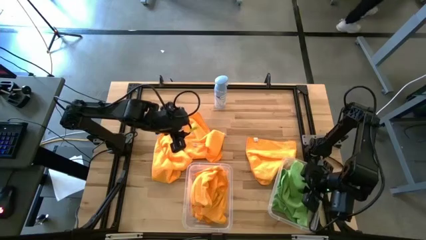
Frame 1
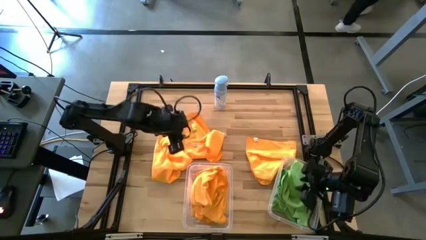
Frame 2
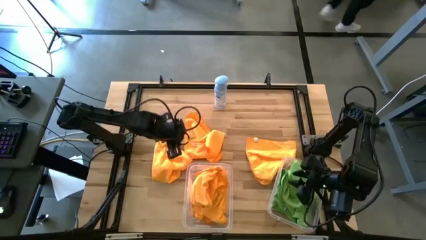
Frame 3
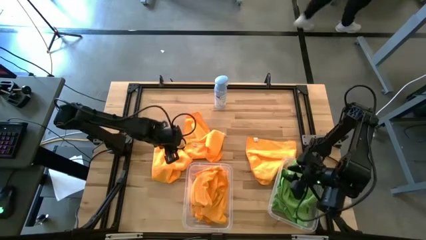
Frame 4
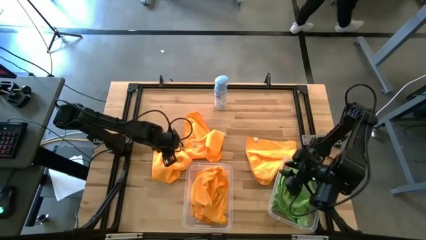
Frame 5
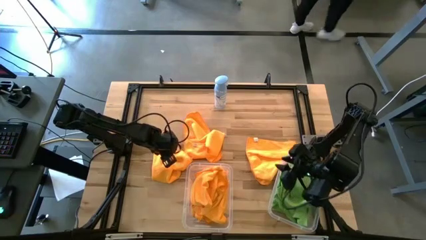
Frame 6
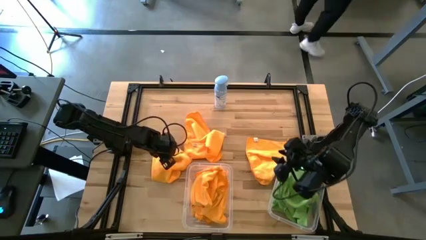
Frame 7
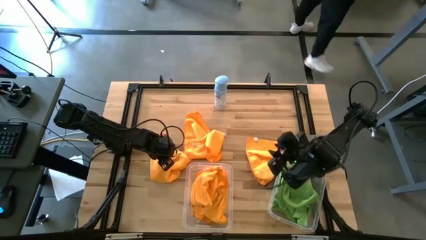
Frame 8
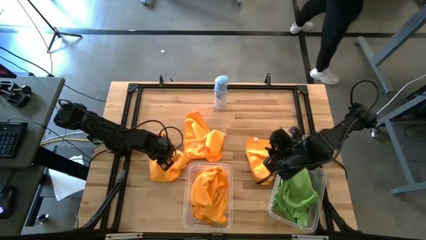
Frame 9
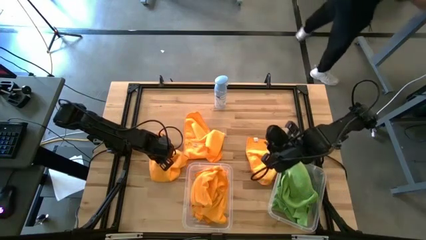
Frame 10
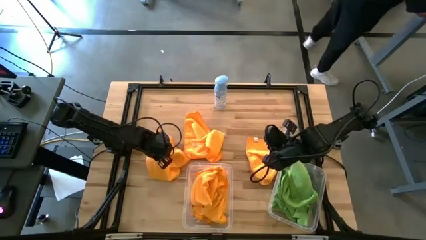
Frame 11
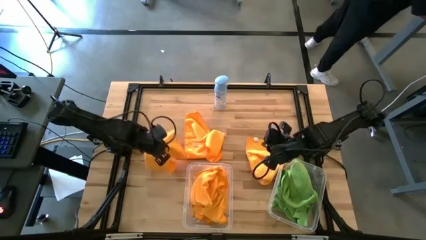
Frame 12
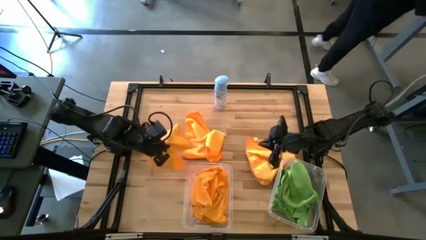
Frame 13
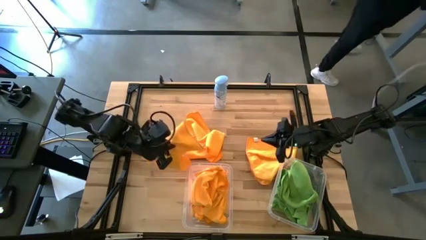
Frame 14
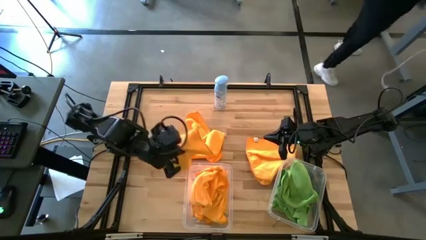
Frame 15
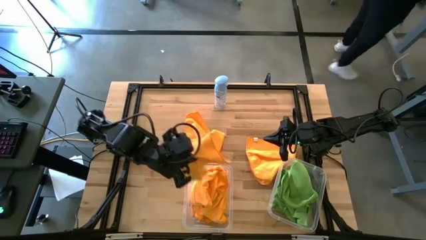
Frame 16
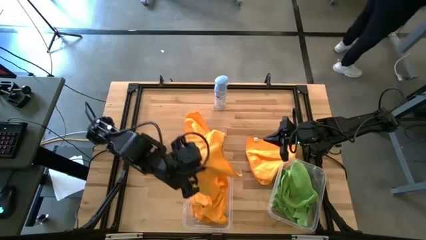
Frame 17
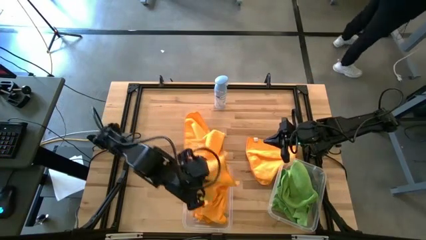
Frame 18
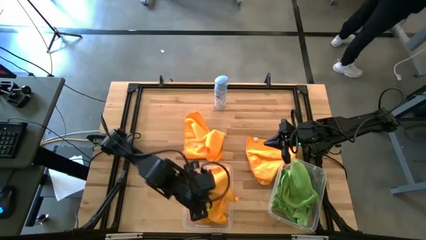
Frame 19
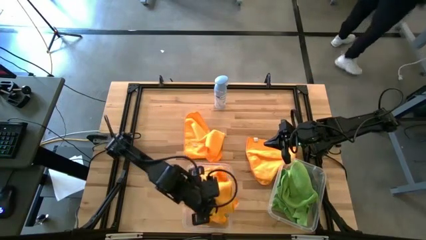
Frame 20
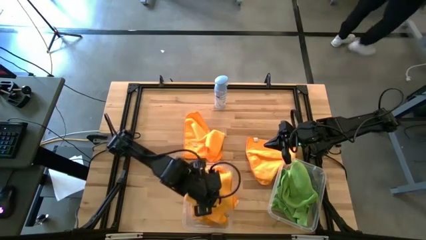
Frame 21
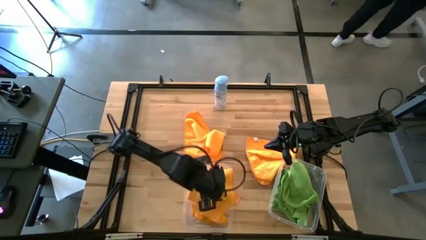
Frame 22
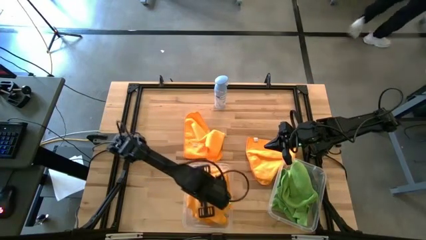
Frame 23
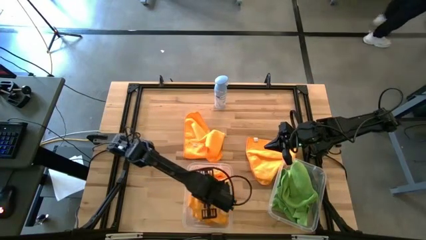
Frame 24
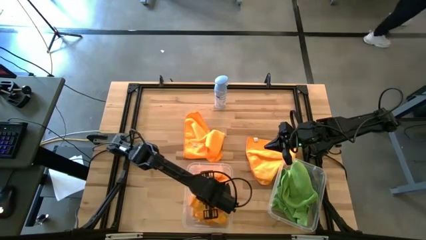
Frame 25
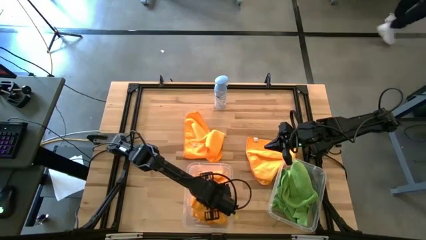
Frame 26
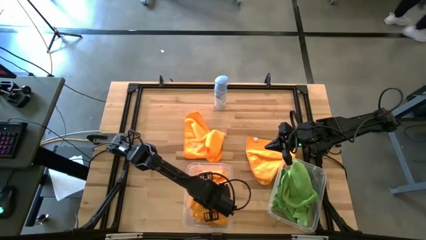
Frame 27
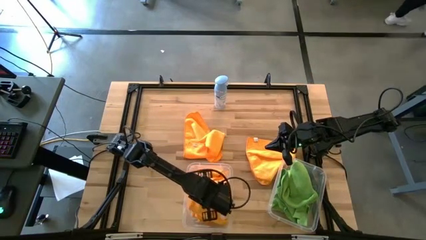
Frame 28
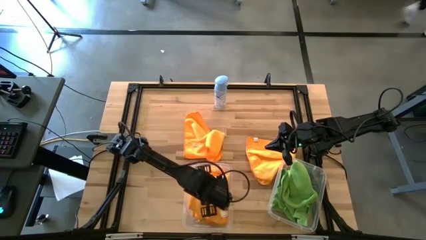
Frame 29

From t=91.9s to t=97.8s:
Task: Sort microfiber towel by color & place in baskets
Put the yellow towel into the left transparent bin

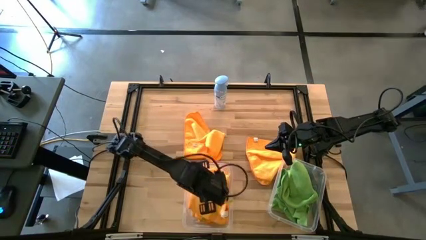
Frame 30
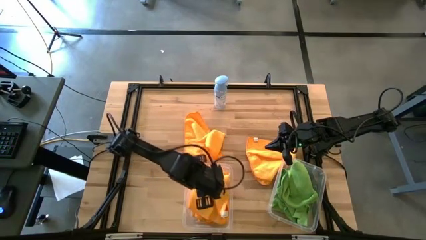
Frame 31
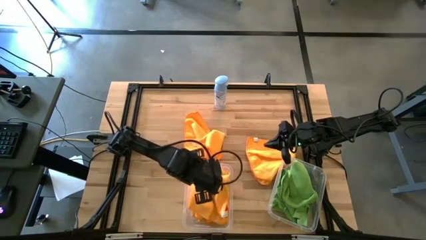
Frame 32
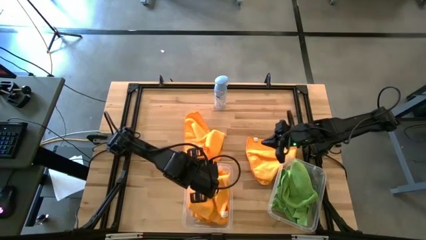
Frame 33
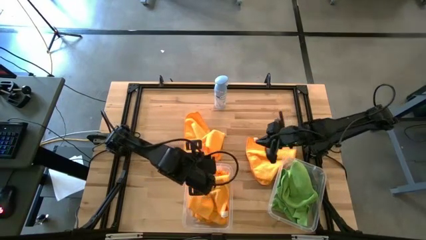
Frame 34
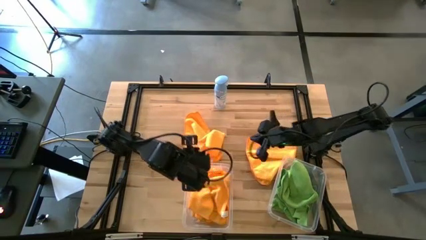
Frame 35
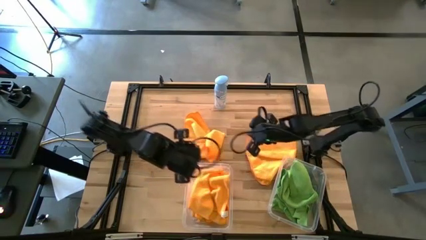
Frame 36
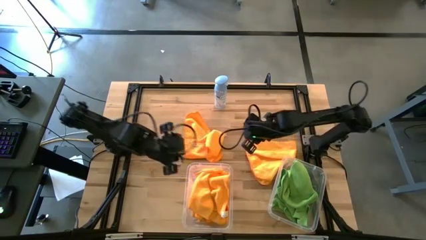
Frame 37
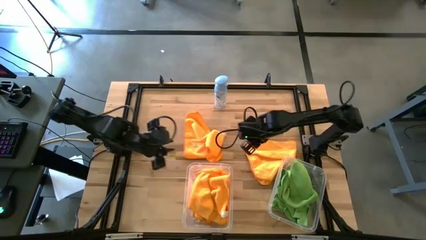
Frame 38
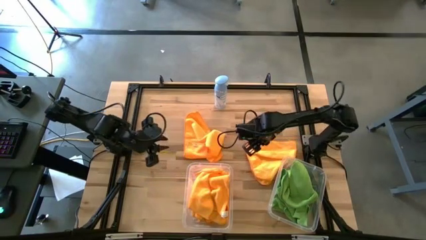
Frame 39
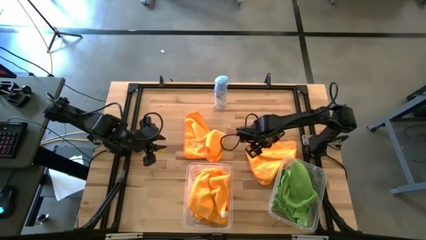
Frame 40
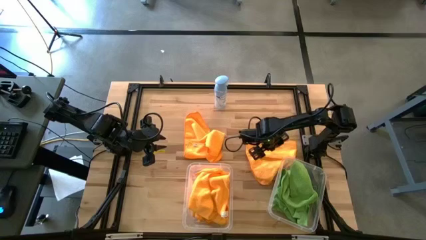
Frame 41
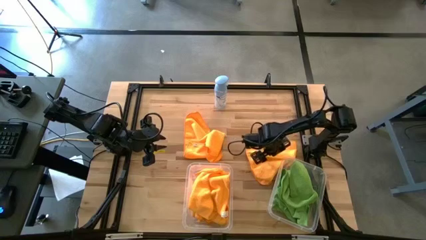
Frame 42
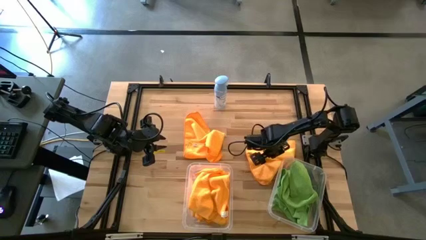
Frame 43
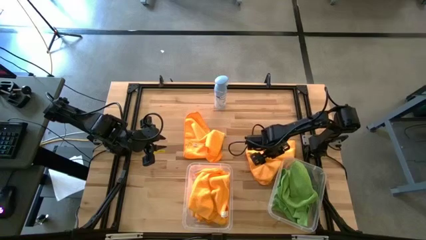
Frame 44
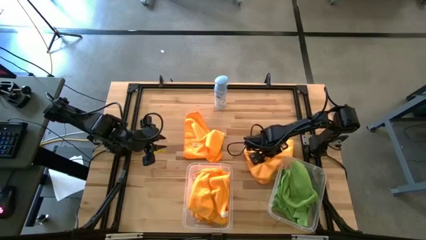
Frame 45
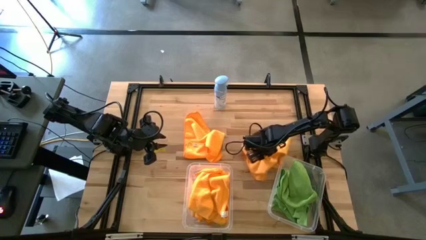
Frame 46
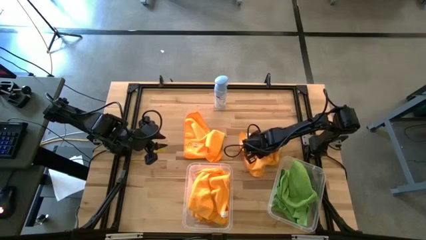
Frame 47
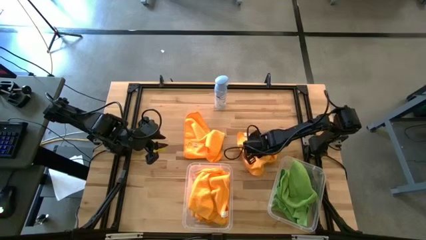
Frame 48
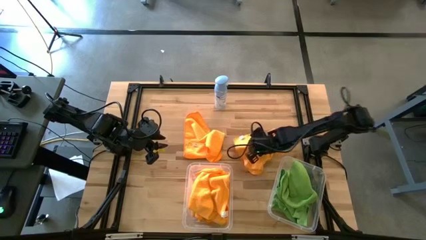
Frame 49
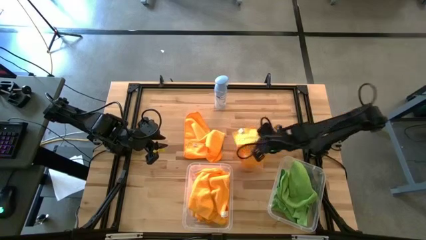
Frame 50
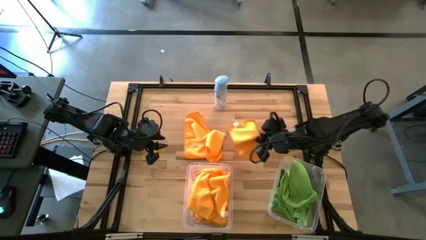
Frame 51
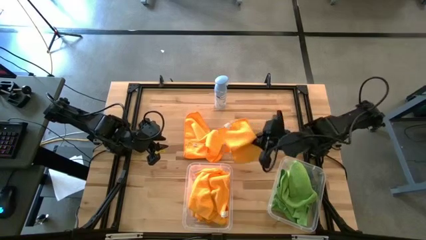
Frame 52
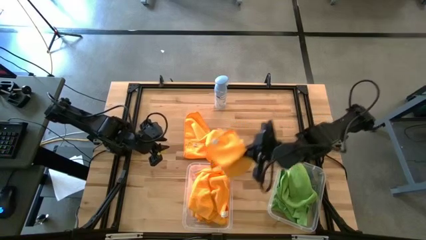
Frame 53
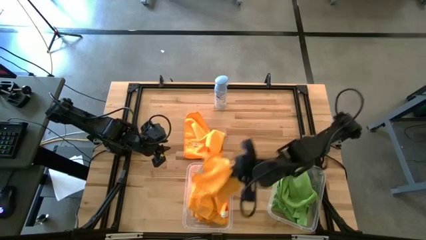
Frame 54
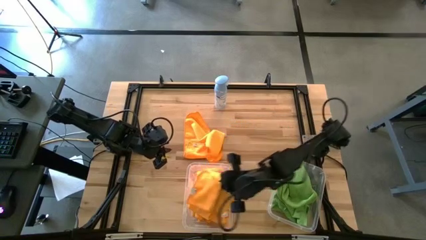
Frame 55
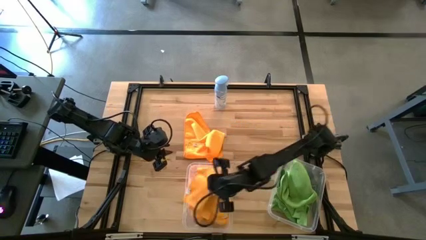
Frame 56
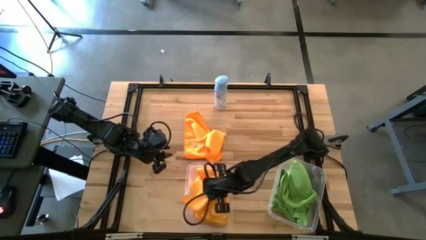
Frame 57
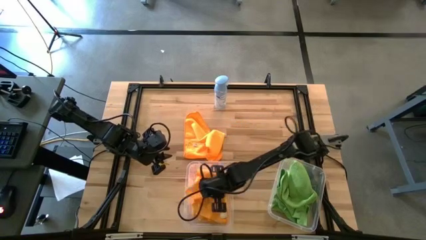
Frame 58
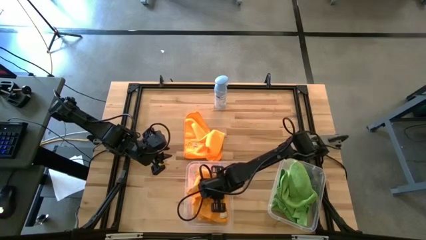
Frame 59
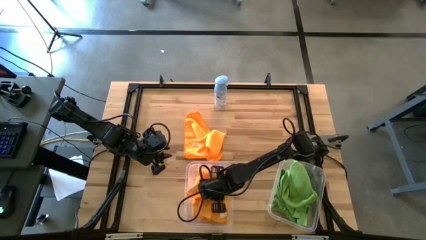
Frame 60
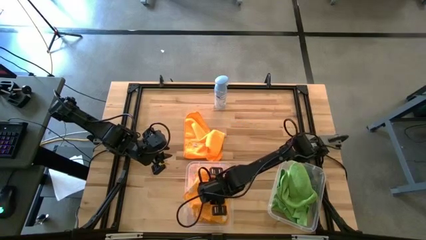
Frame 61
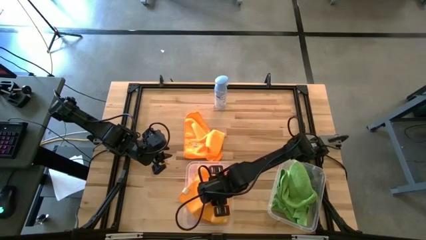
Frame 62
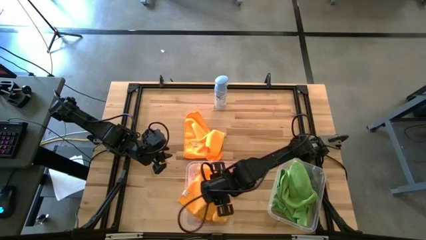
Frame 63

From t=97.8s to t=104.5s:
Put the yellow towel into the left transparent bin

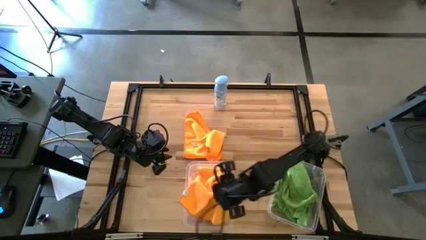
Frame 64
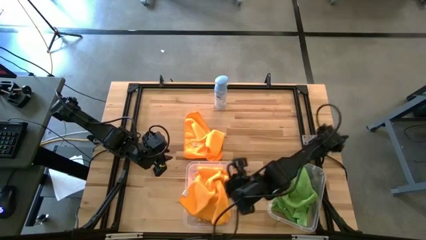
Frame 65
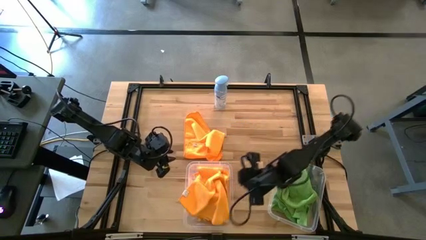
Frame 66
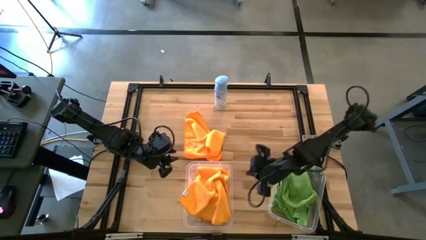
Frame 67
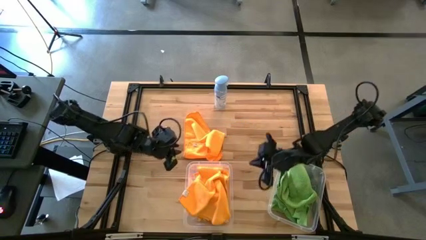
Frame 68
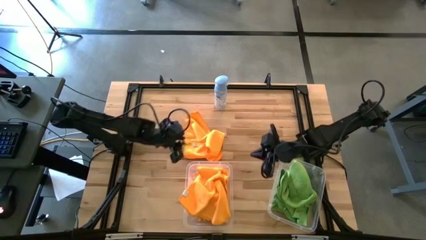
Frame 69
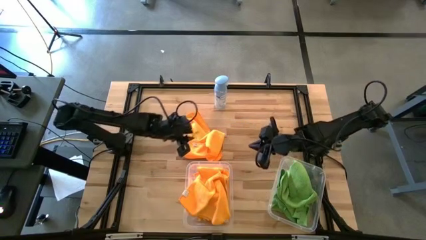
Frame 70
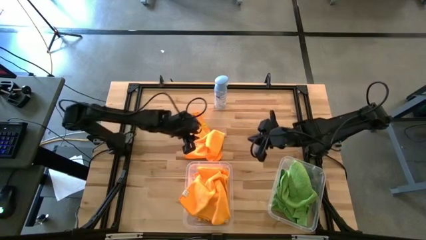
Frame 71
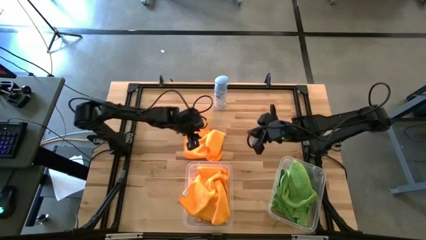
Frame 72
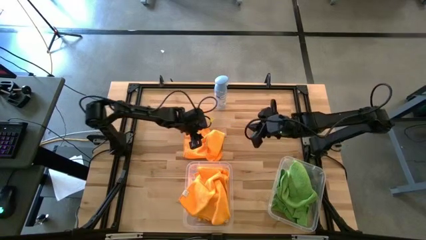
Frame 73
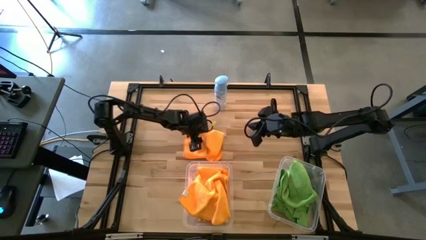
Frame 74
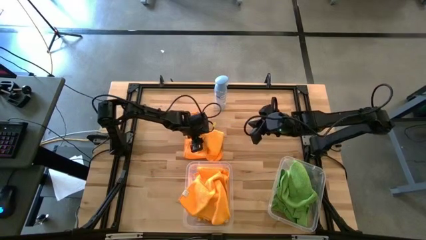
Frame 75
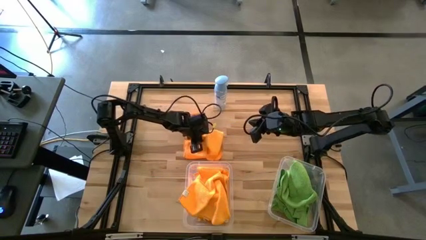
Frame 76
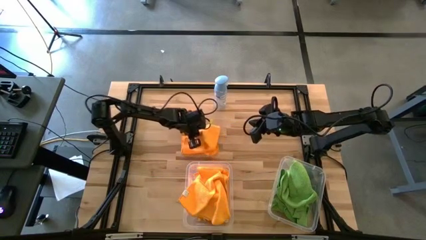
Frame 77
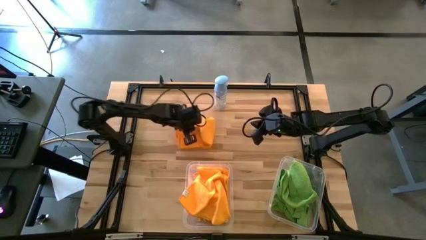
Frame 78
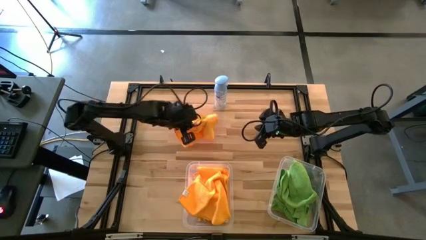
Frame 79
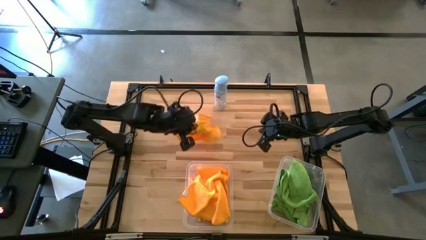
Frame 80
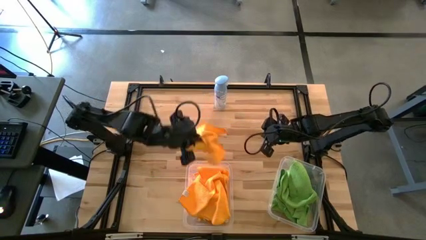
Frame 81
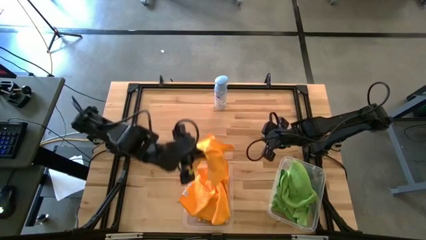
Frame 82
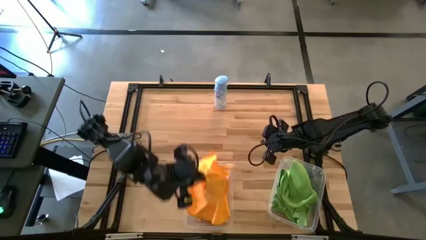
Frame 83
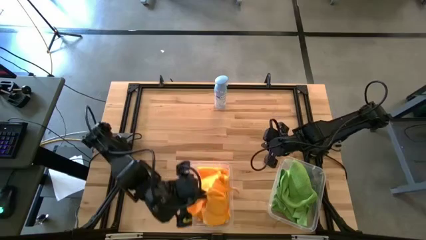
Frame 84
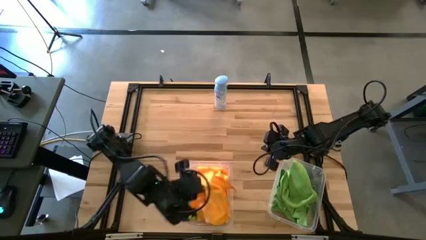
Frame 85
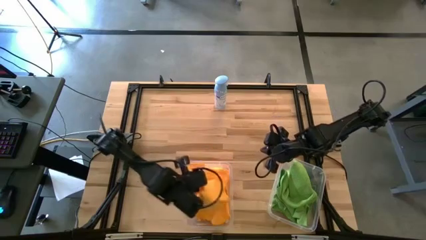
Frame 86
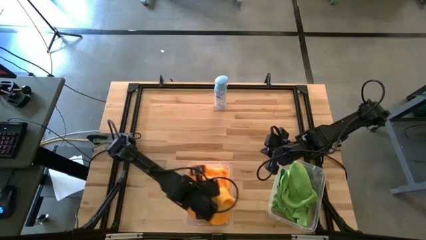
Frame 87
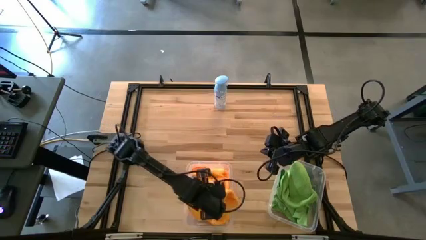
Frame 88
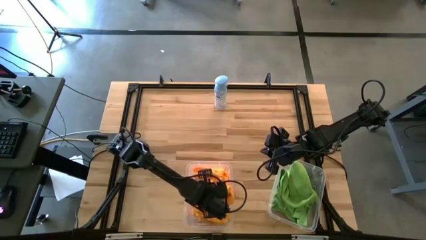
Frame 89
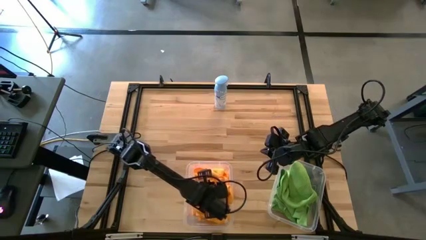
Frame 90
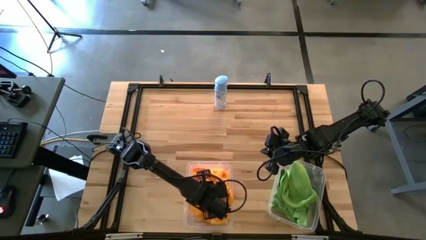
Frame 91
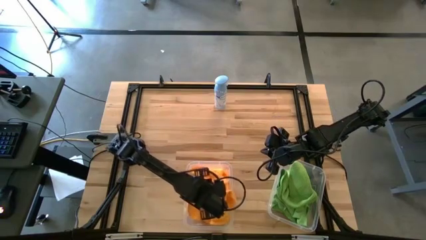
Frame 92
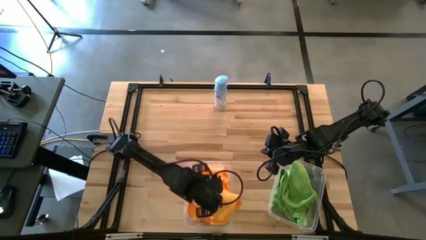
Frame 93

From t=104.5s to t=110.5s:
Put the yellow towel into the left transparent bin
